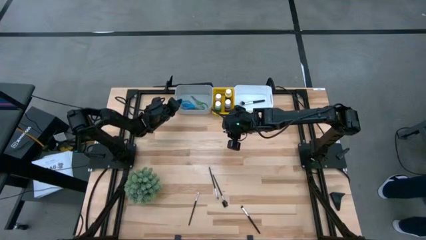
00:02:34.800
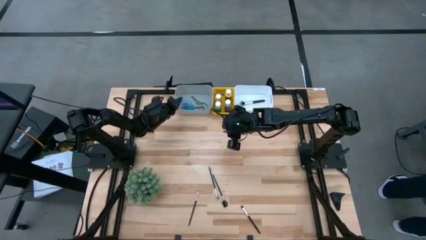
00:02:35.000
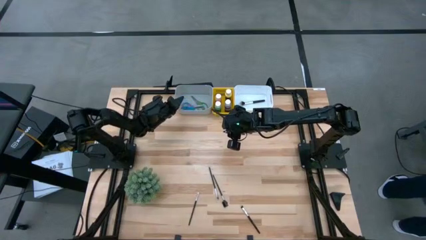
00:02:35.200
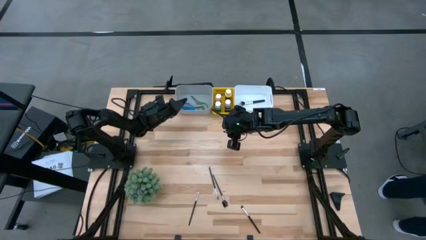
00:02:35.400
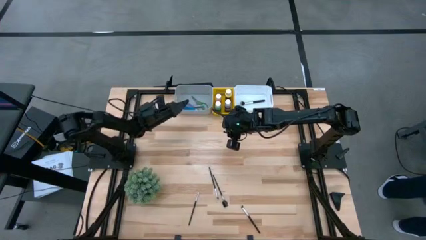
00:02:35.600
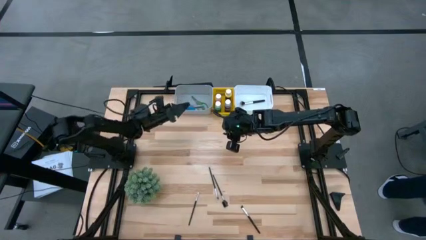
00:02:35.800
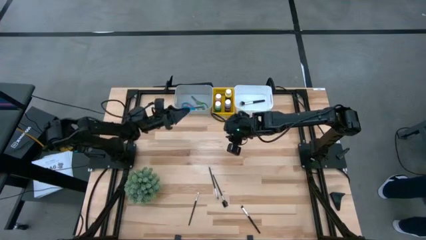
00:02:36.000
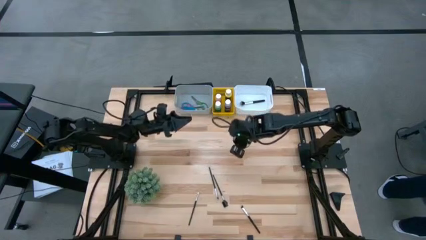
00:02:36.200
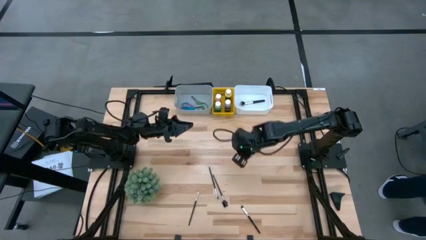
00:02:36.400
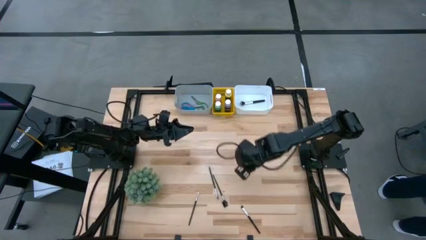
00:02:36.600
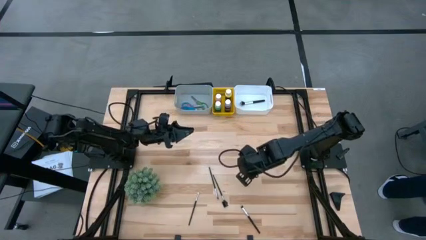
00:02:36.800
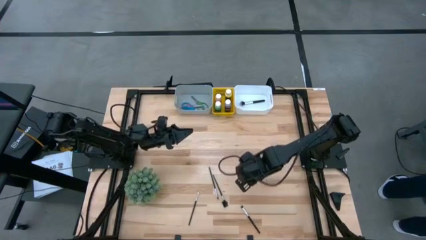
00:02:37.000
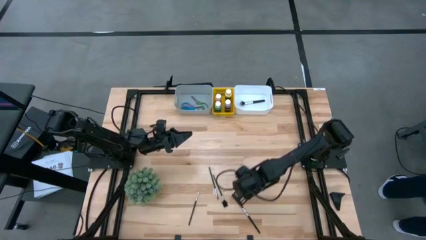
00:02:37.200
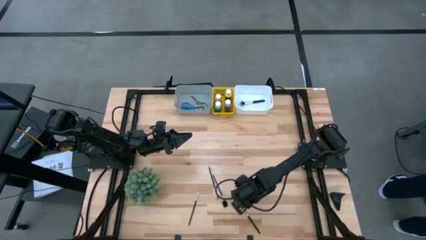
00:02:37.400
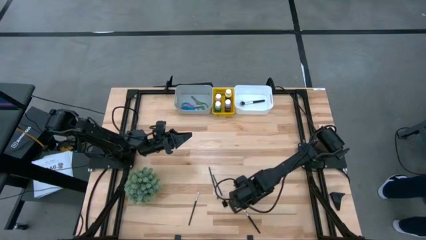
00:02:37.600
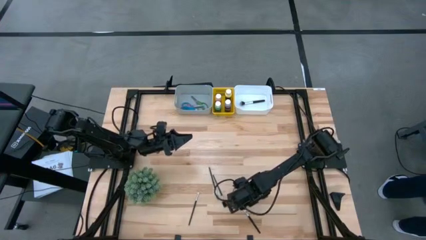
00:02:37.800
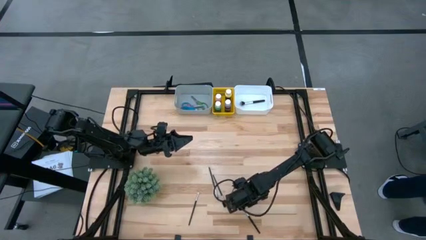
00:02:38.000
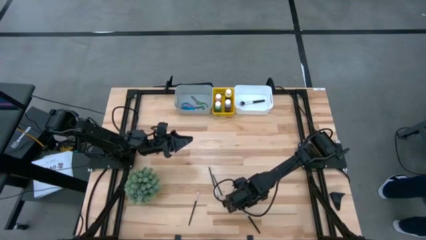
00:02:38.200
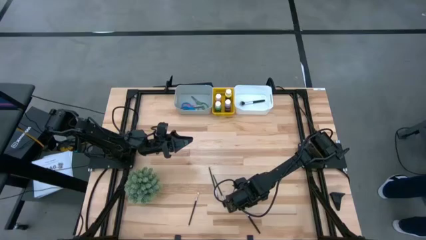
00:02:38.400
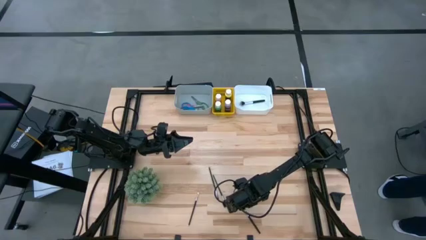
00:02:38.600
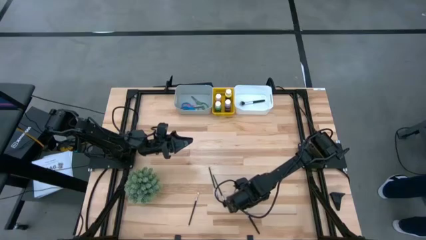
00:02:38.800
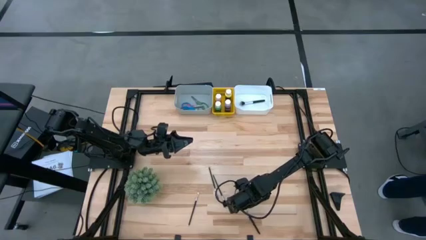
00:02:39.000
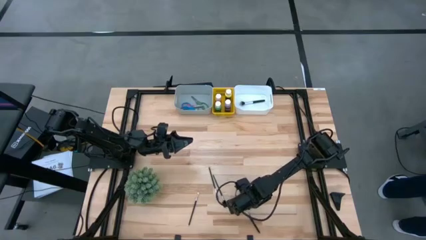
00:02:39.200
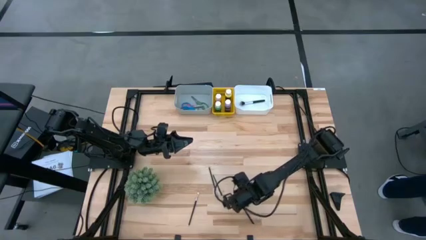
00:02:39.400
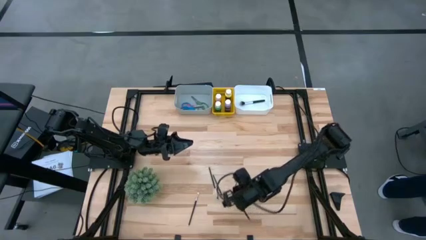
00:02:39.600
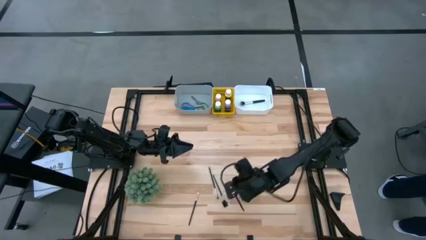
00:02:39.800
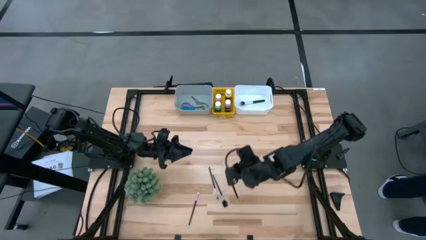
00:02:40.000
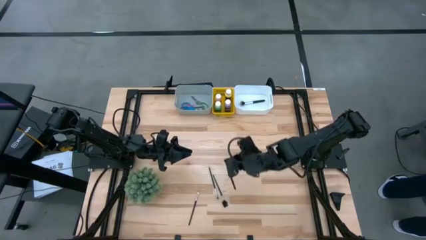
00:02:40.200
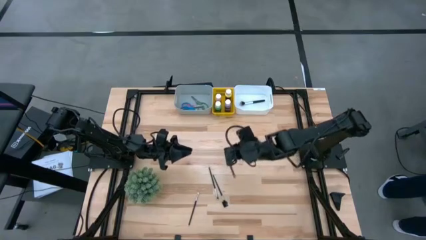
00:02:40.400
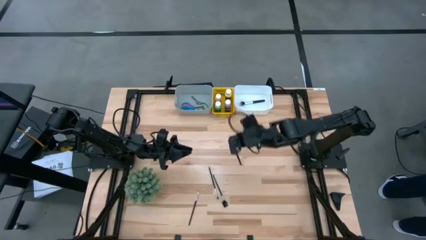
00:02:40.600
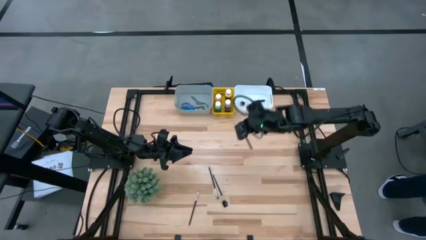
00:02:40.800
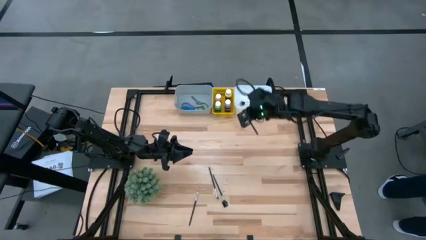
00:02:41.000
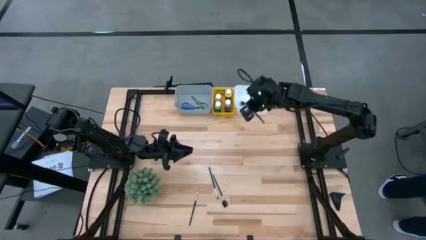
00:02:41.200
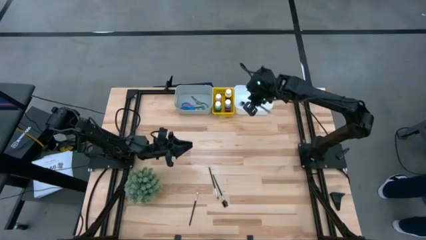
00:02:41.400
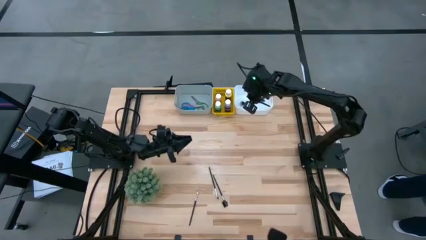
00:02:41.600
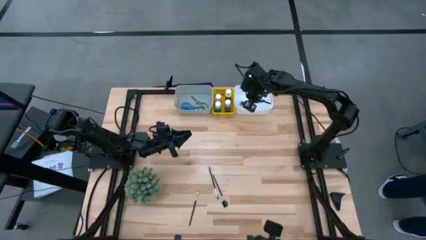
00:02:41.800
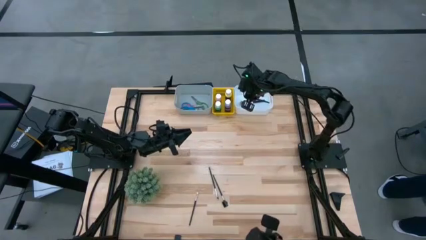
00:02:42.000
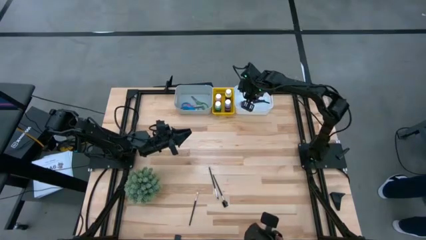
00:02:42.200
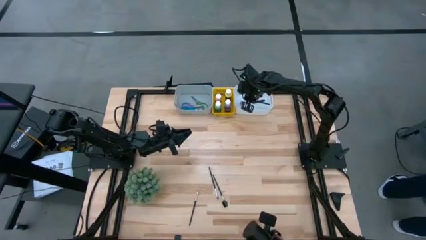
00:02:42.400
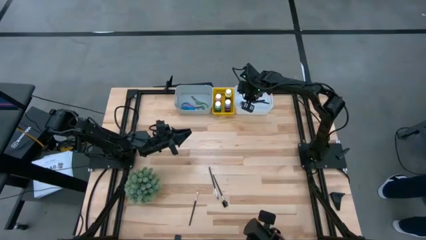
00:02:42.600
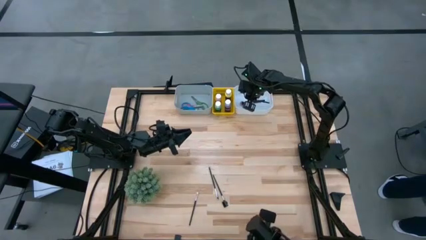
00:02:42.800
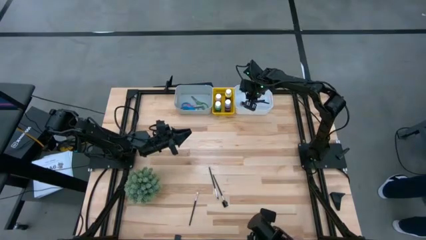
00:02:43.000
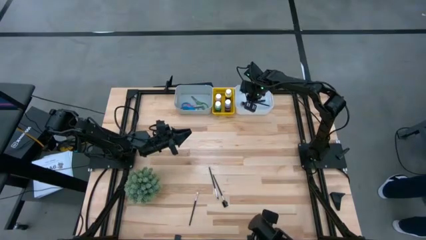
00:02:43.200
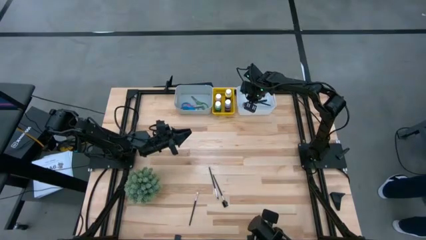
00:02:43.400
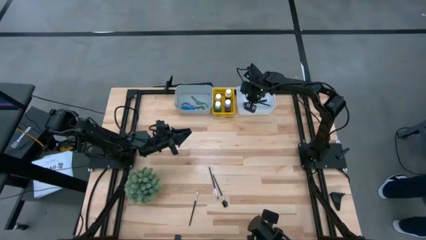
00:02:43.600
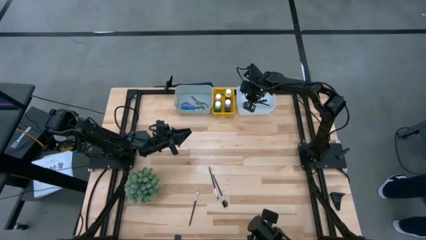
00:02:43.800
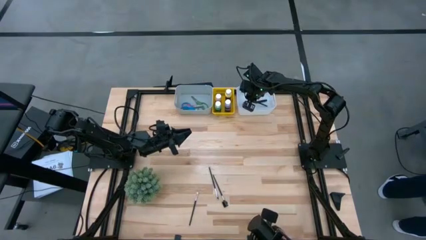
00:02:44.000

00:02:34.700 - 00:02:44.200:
Task: Pick & Place Paint Supplies
Put the right black foundation brush into the white bin

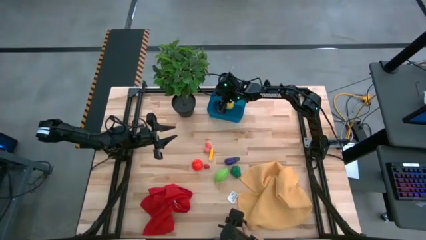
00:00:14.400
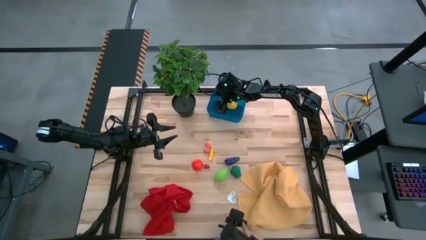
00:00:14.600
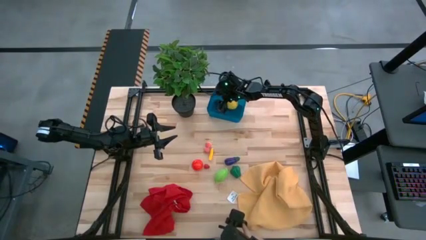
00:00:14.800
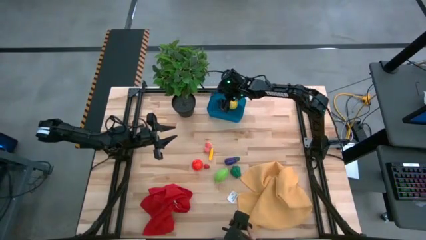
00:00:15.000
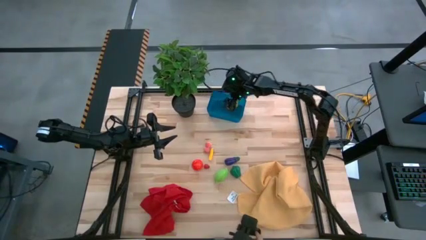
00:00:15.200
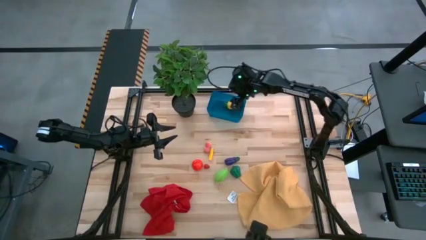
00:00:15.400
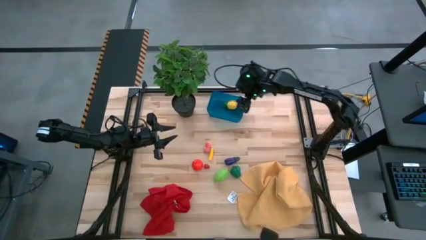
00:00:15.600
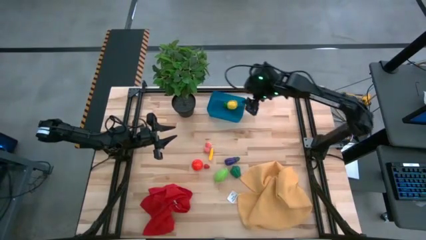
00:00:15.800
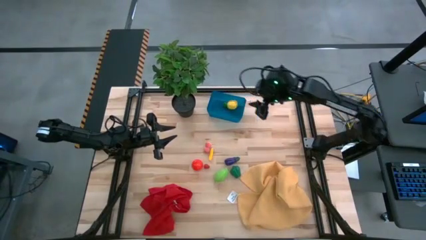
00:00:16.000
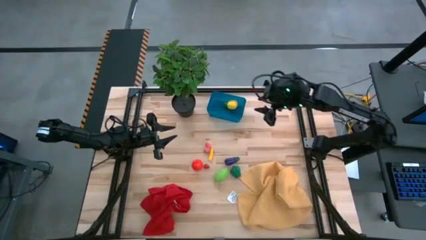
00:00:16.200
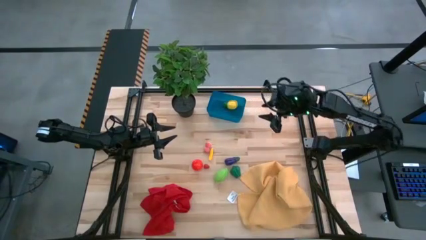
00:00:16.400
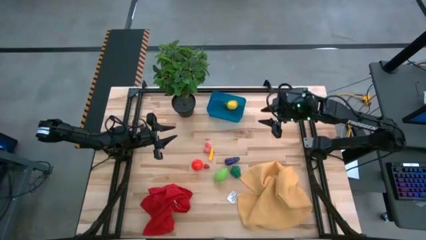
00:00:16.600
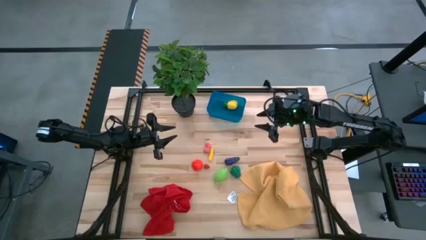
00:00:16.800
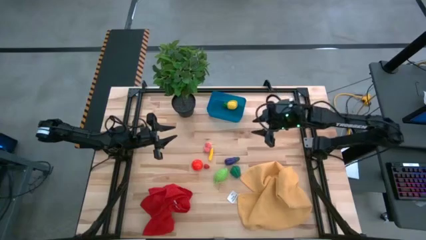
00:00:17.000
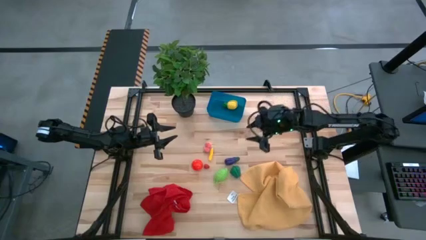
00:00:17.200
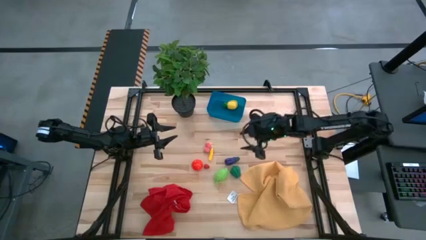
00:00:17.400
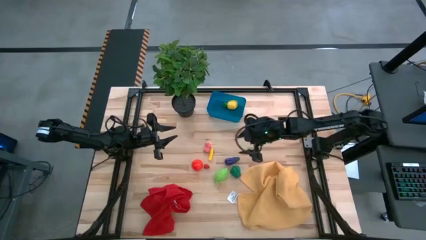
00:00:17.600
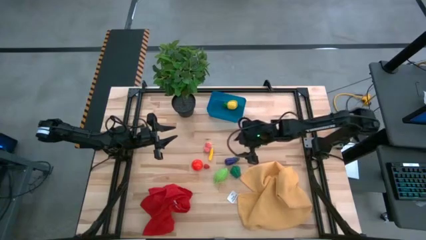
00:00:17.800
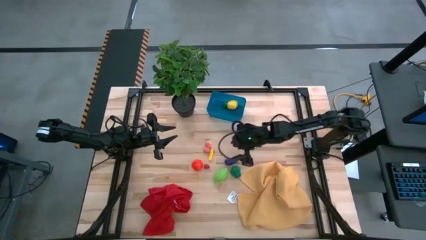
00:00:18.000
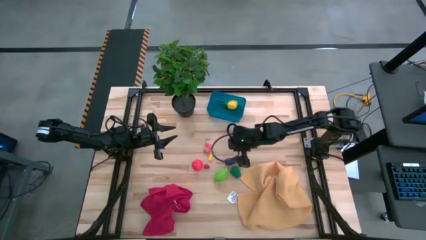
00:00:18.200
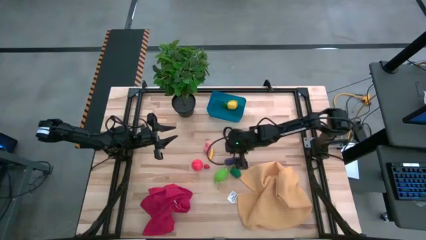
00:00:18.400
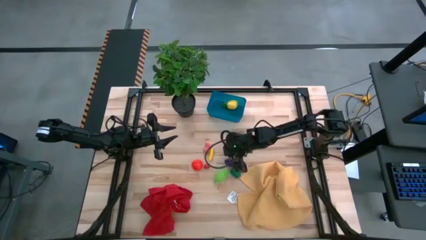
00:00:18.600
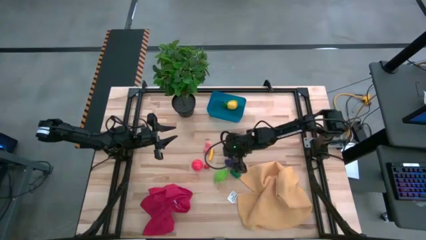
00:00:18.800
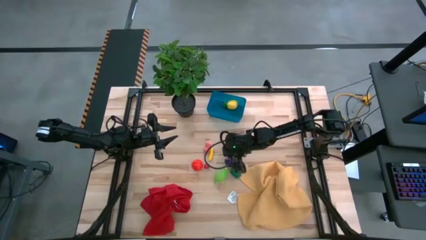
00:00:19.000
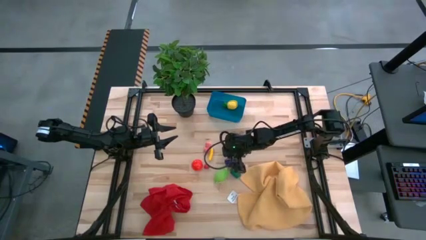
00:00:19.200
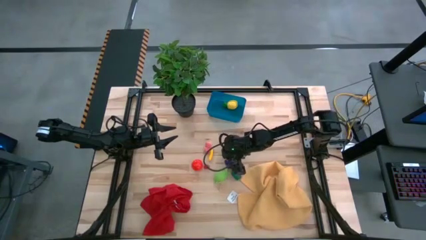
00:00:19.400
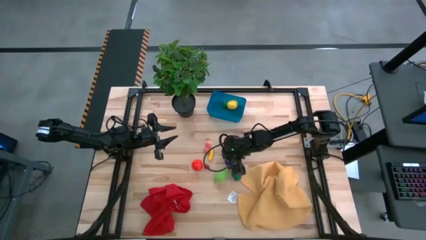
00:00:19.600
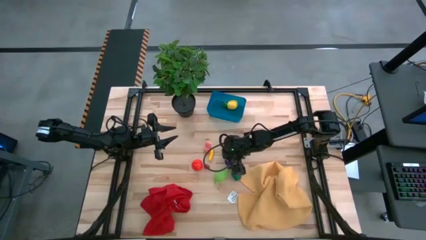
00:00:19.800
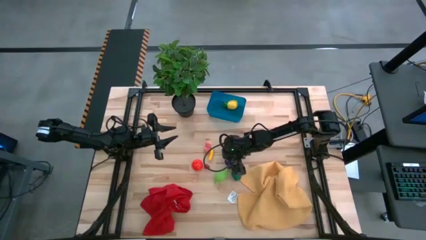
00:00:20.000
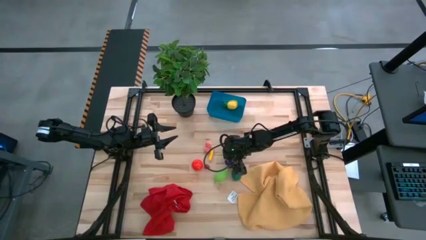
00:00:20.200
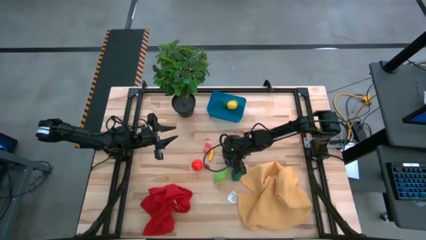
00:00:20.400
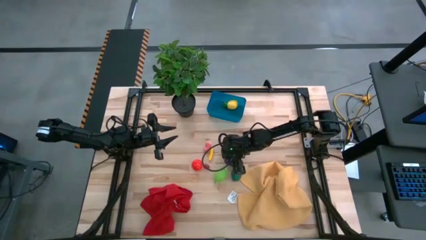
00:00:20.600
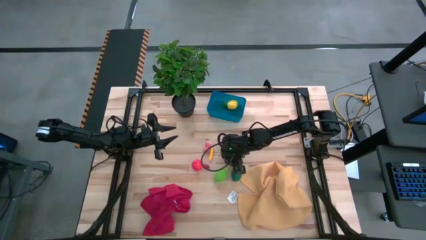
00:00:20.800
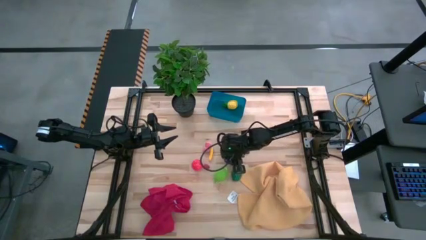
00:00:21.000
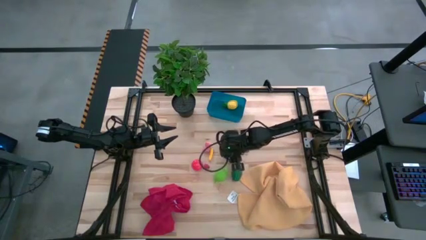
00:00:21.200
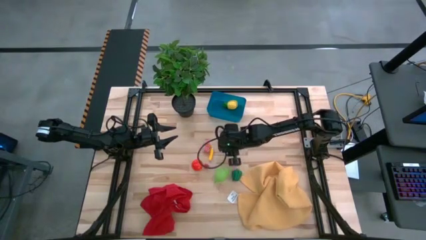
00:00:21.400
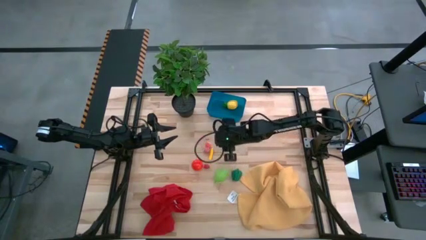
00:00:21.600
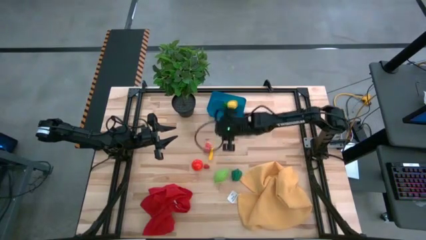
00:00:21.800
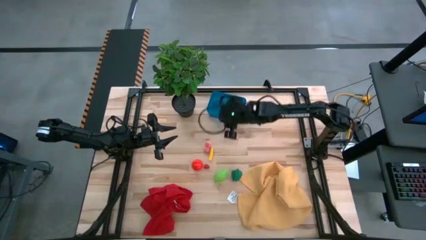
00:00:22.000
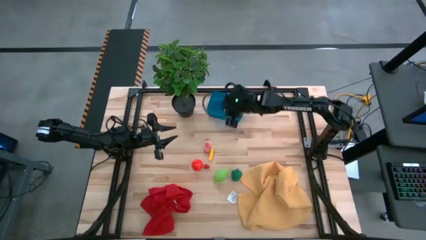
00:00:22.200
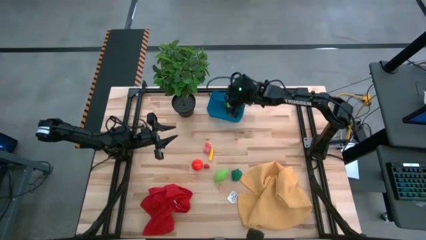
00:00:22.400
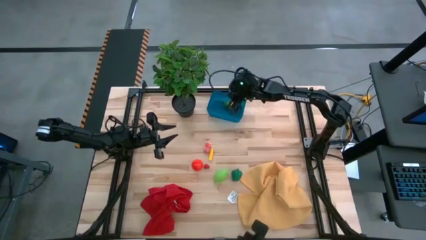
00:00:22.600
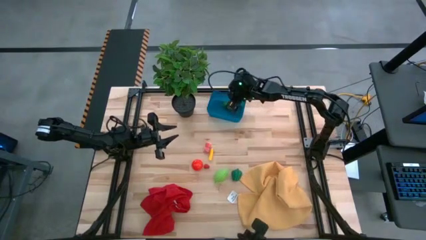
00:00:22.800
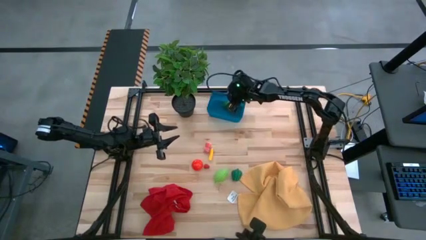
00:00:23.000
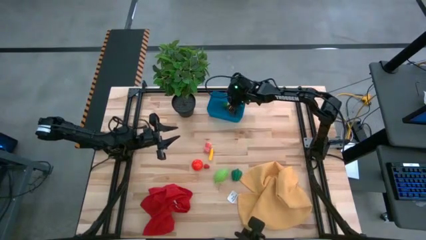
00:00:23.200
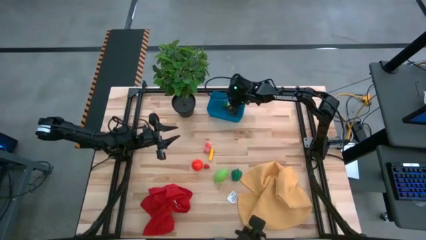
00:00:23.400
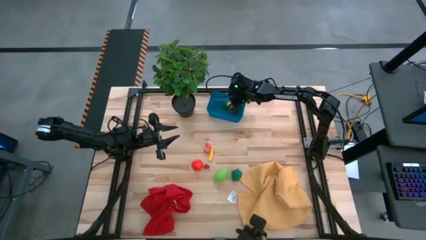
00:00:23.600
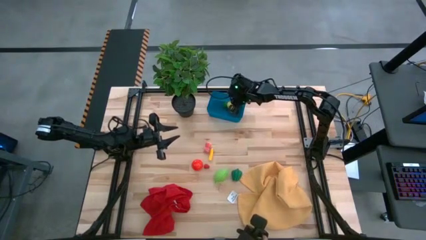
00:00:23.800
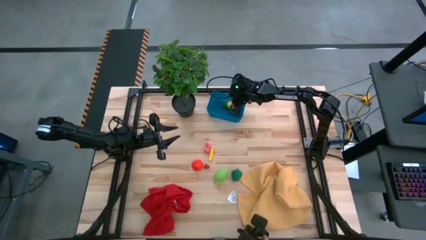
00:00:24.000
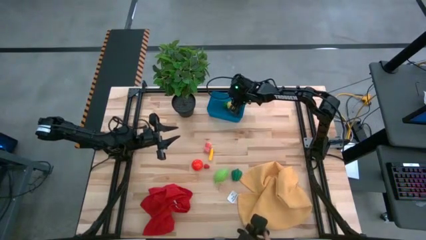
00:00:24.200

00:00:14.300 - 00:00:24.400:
Task: Pick and placing Produce into tupperware
Put the violet eggplant into the blue bin
